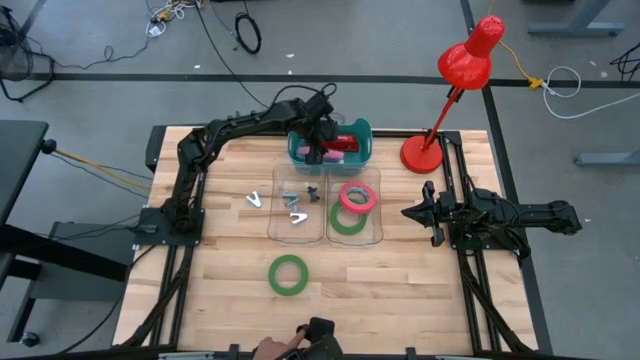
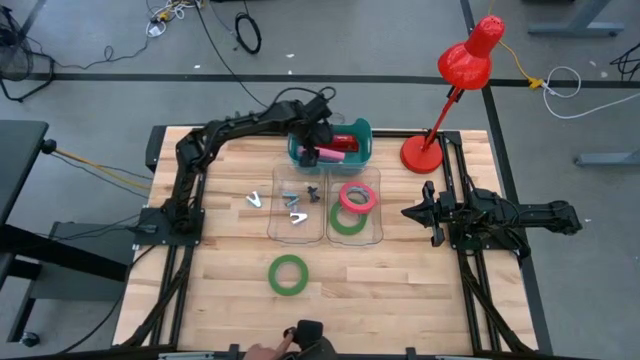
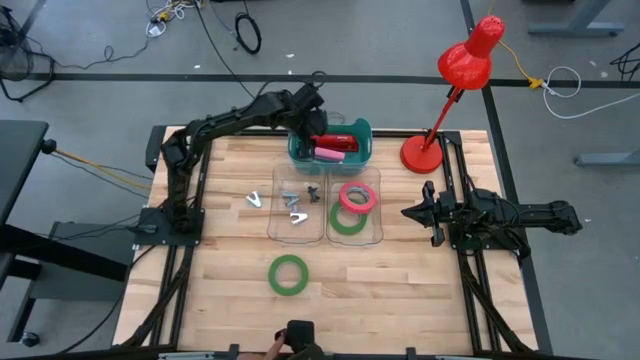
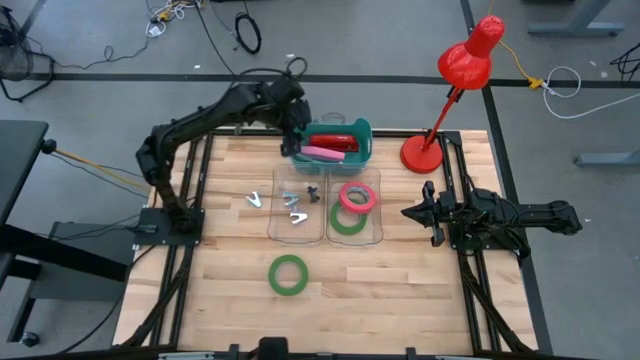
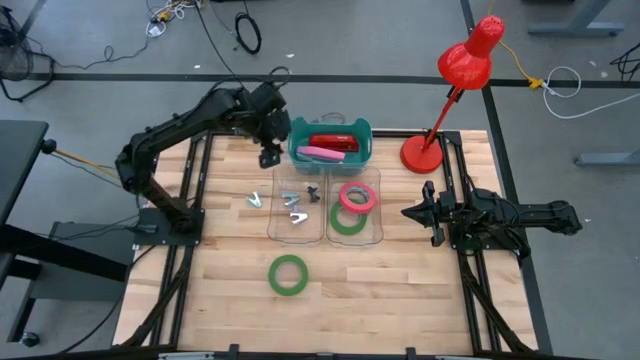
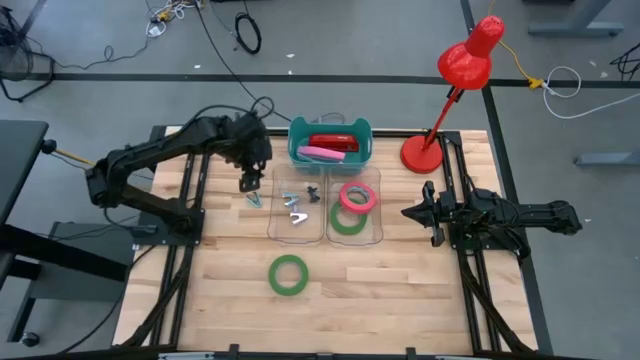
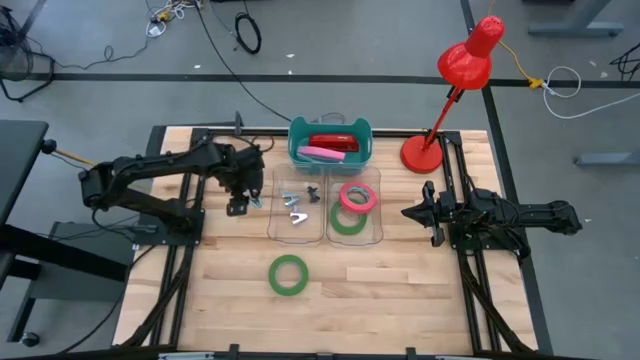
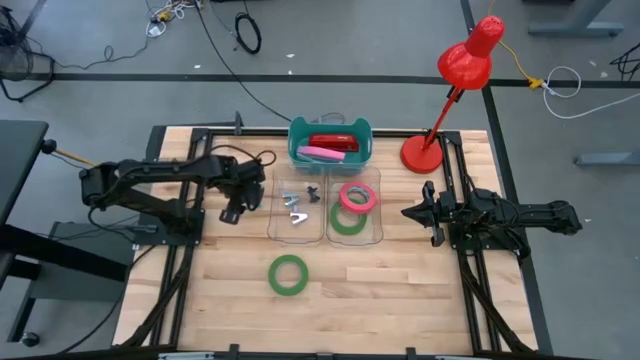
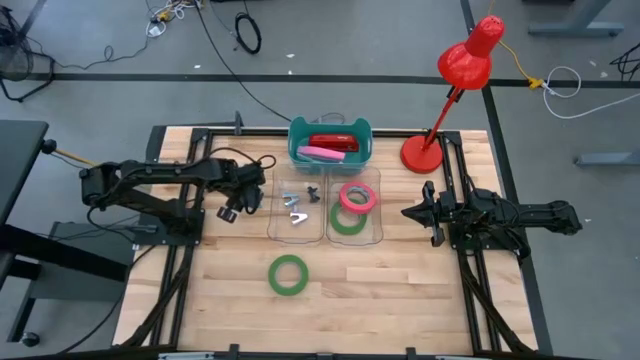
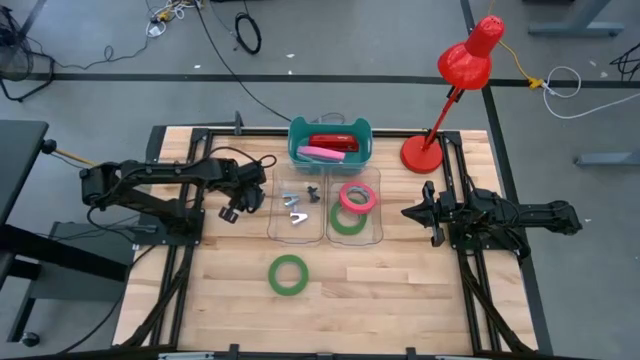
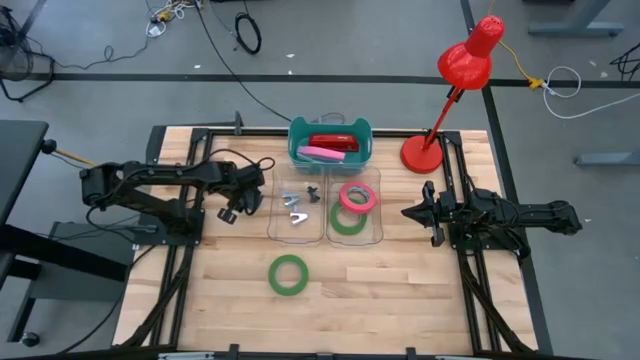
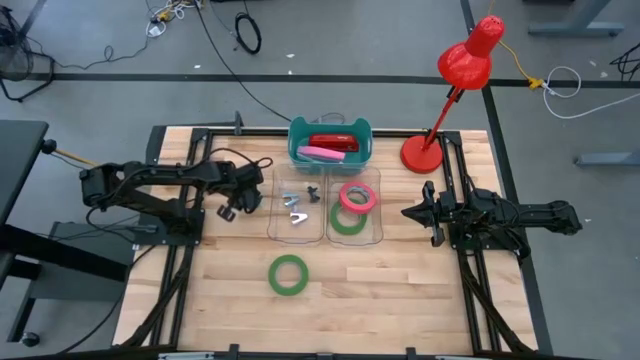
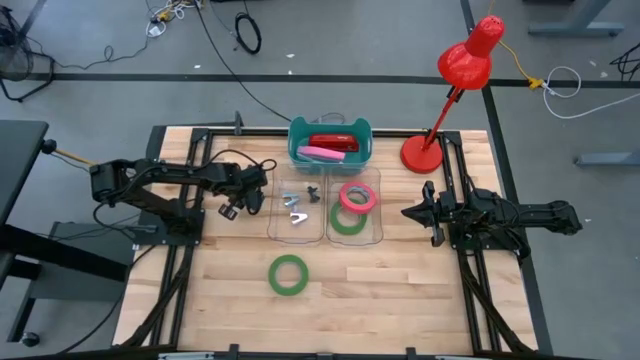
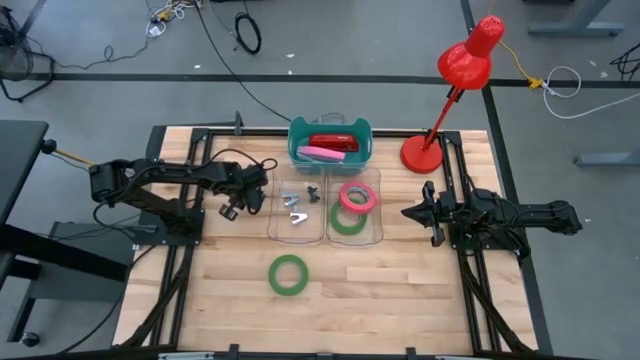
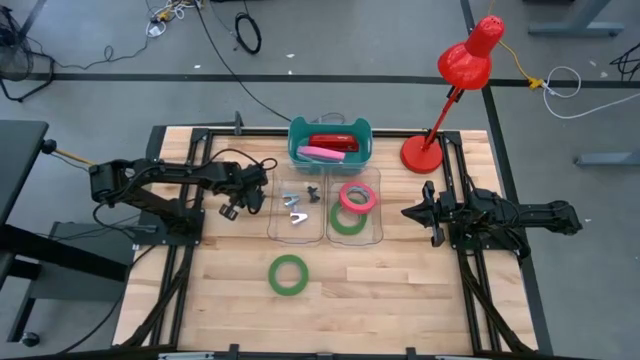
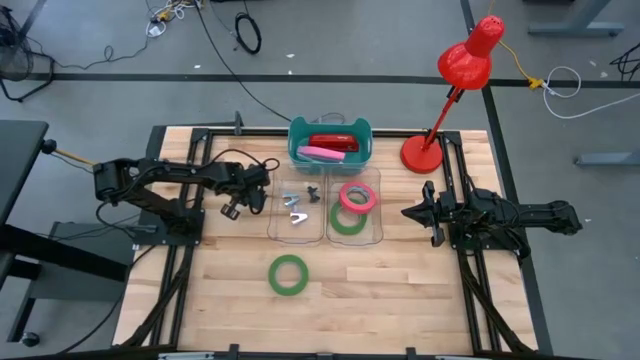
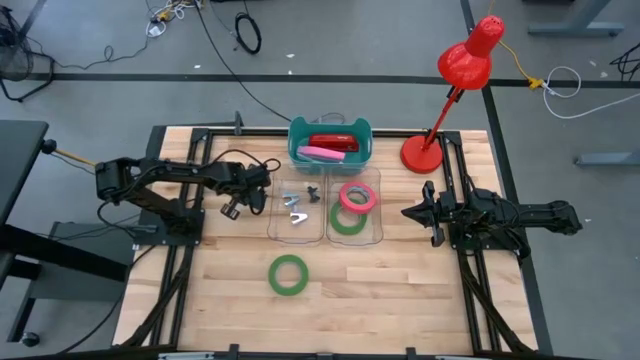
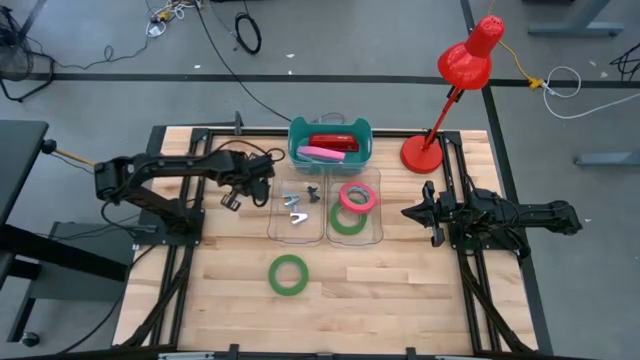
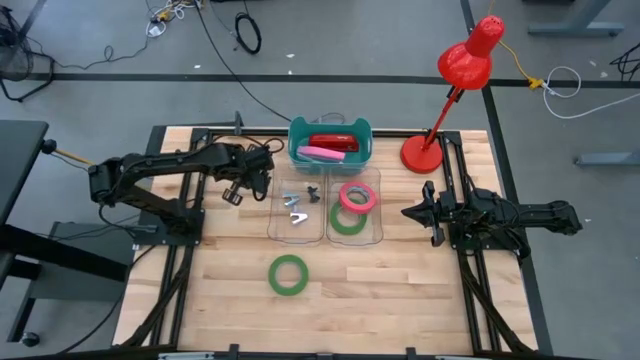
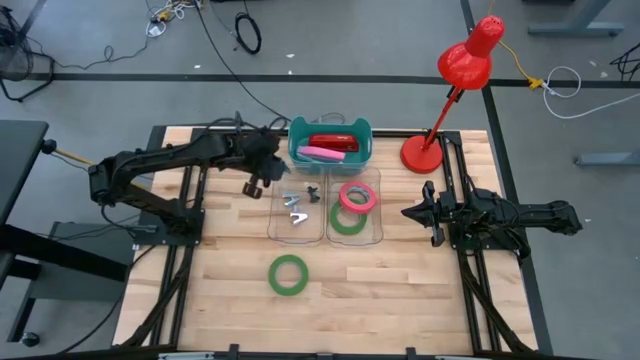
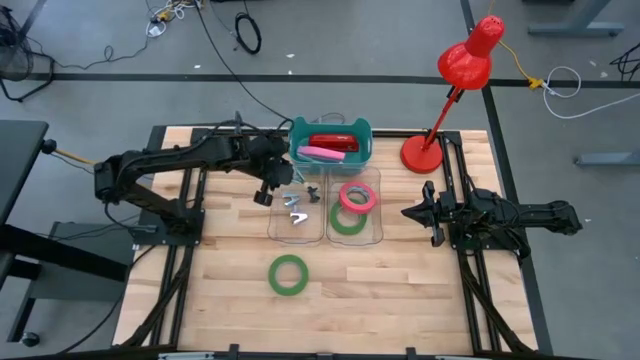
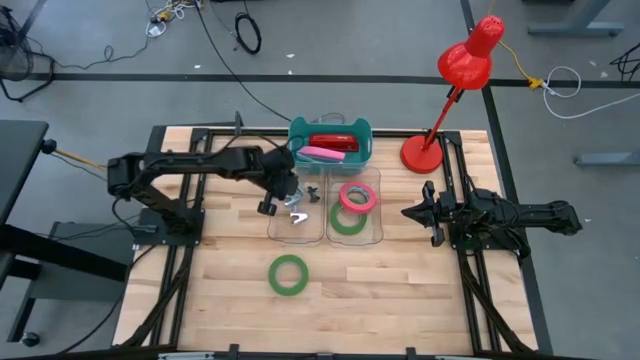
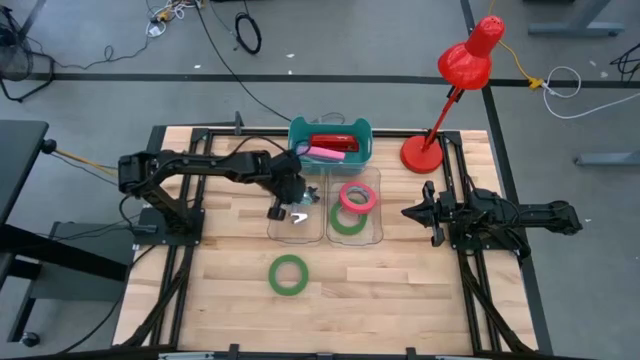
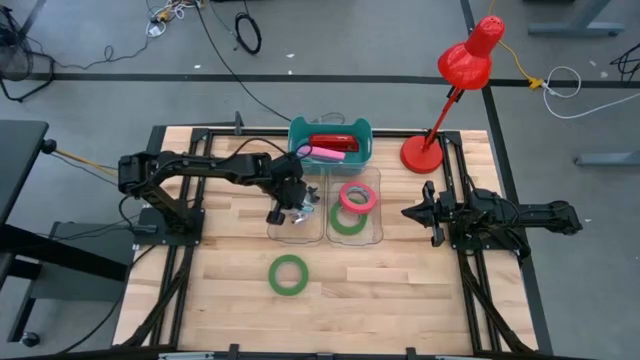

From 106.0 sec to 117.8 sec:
Task: Pick and place Stapler, Stapler remover, tape
Put the blue staple remover into the left transparent bin

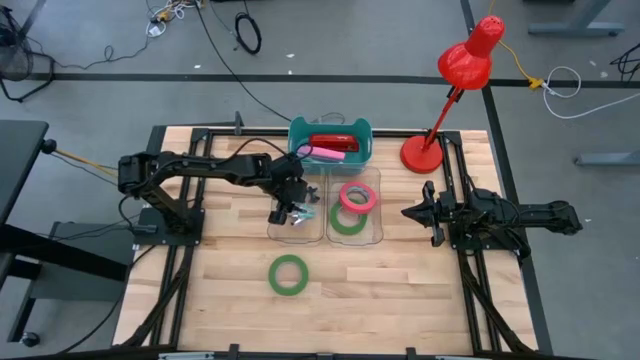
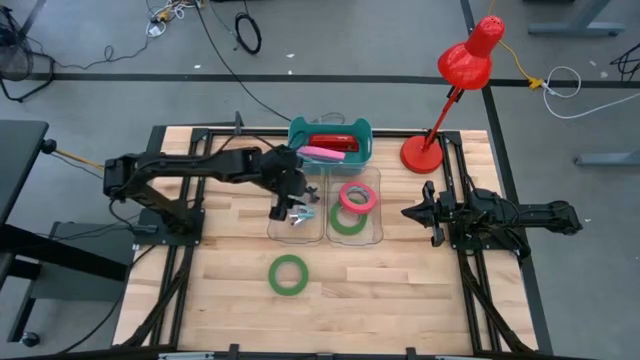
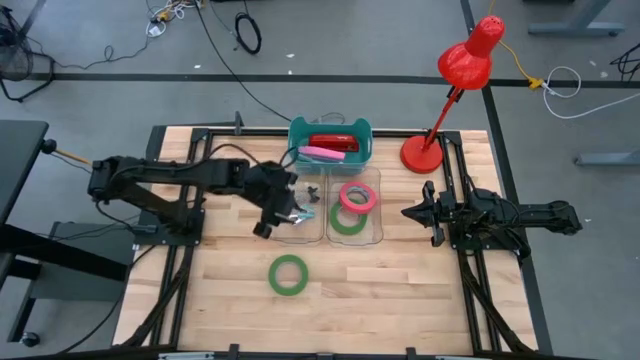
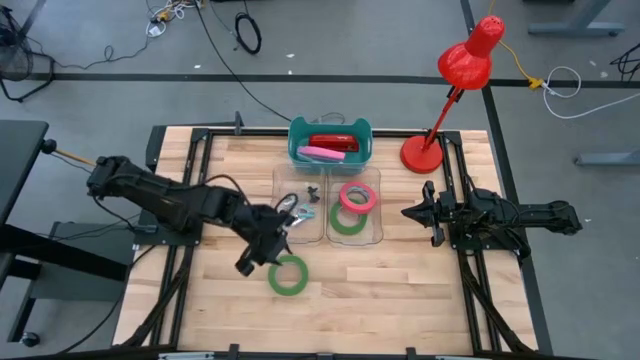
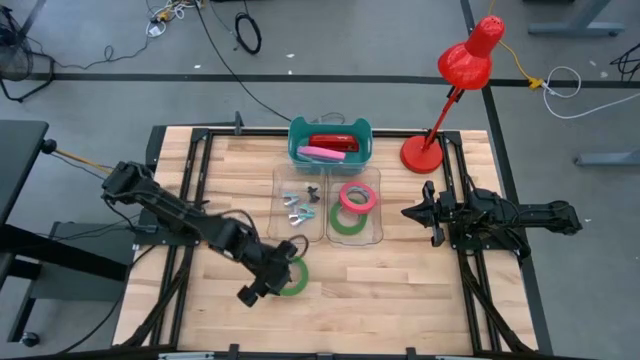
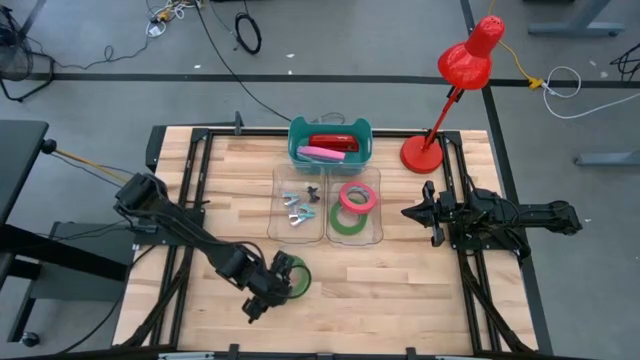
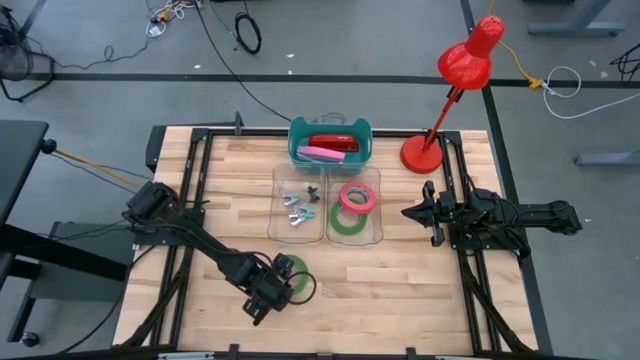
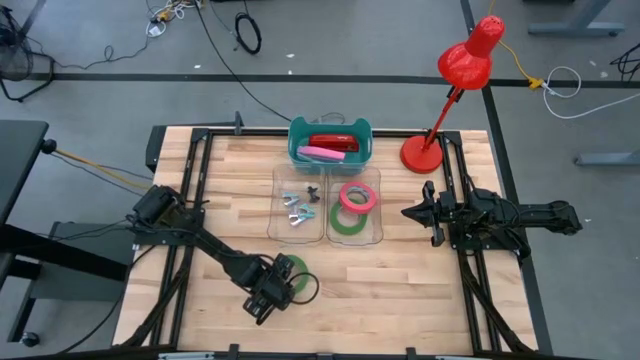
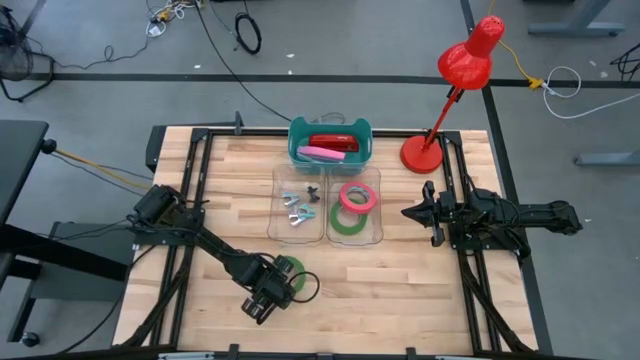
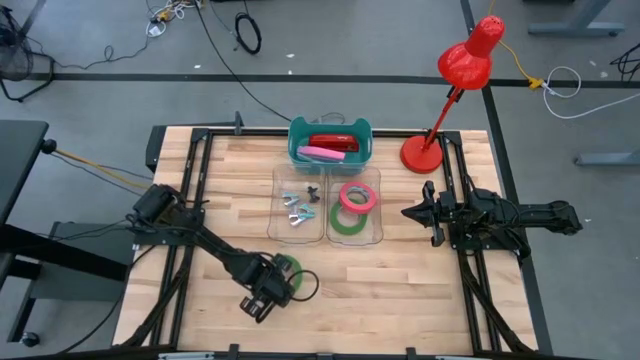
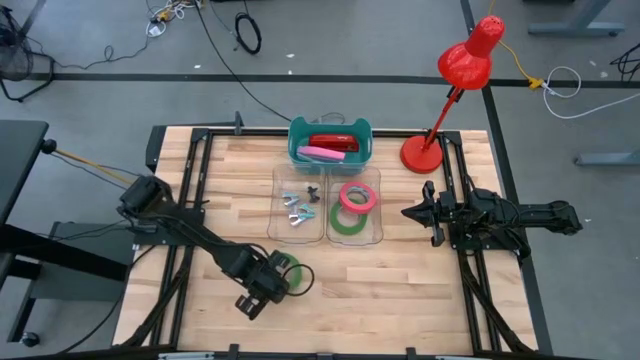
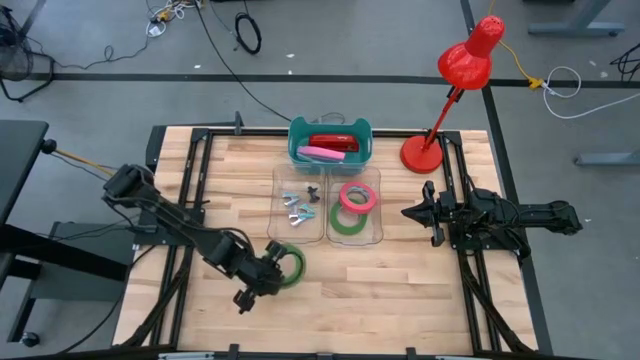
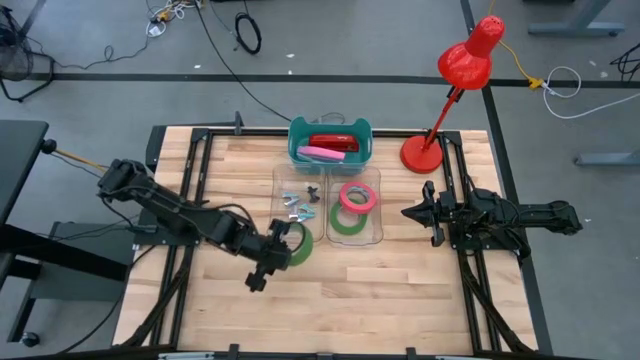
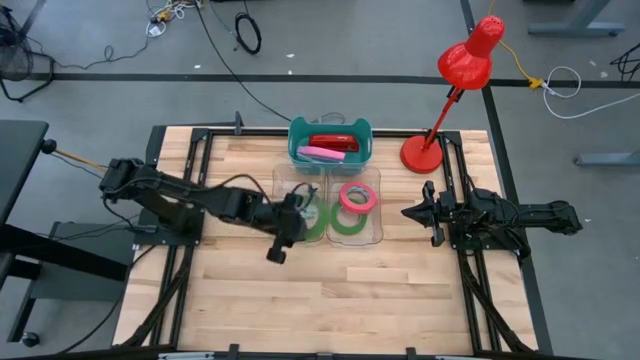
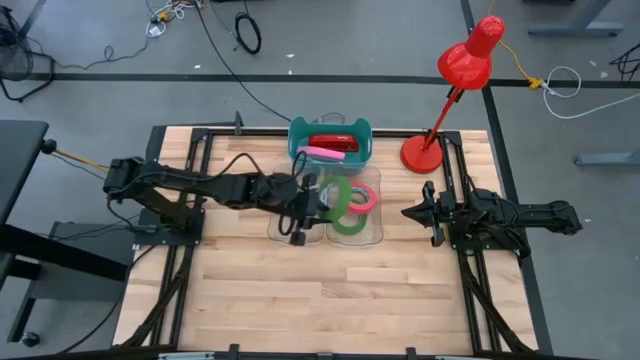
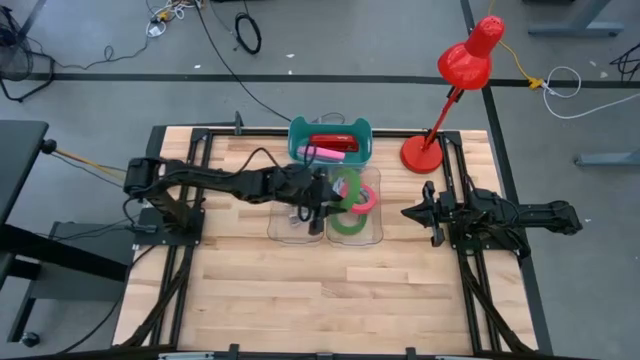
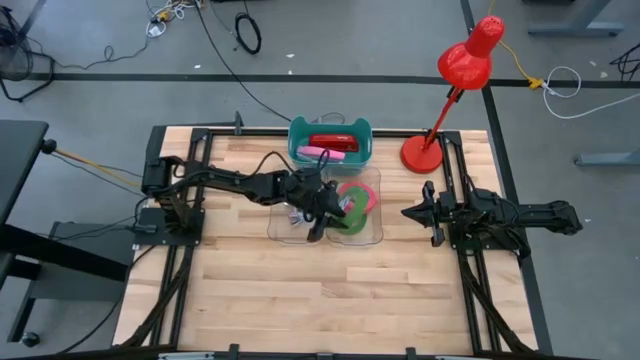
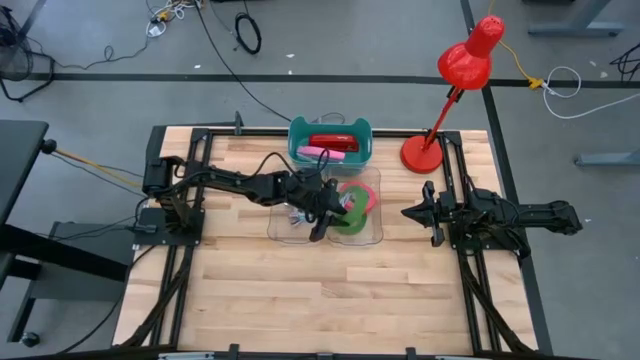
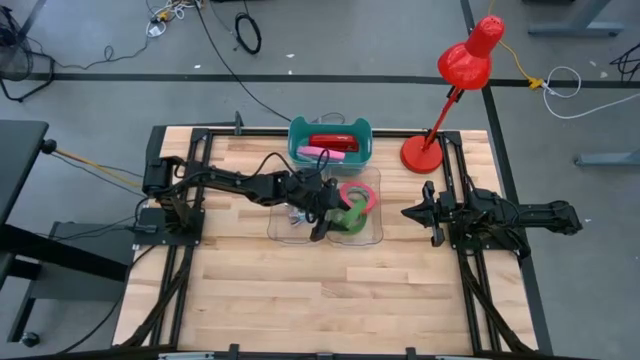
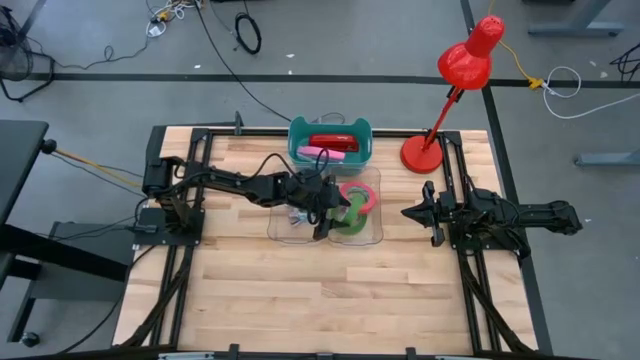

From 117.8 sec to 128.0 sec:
Put the green tape into the right transparent bin
